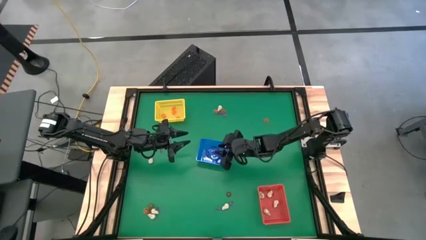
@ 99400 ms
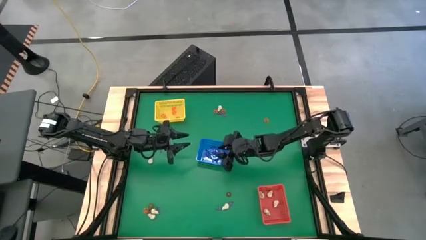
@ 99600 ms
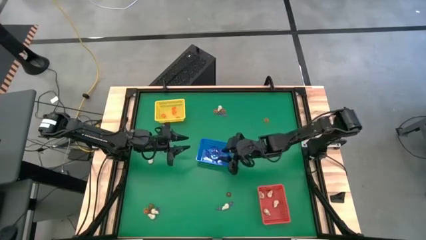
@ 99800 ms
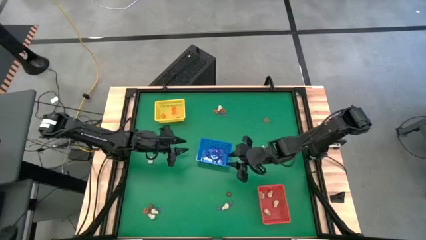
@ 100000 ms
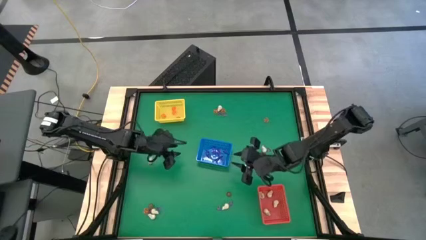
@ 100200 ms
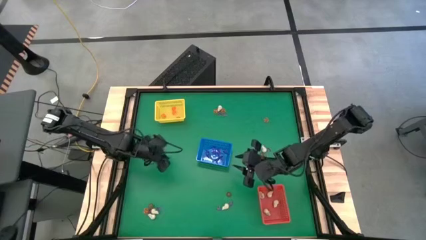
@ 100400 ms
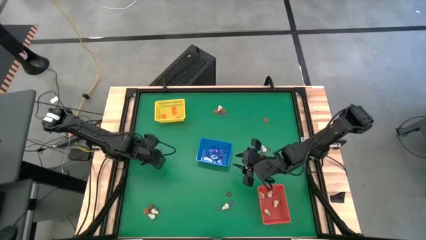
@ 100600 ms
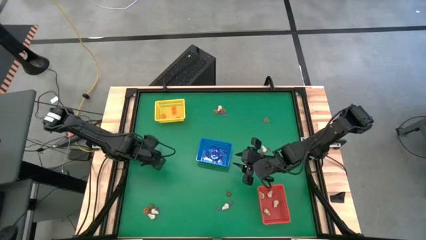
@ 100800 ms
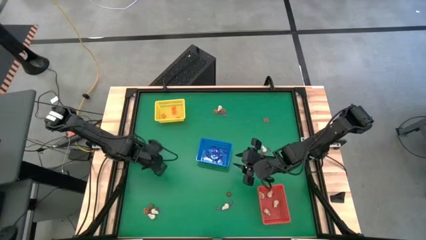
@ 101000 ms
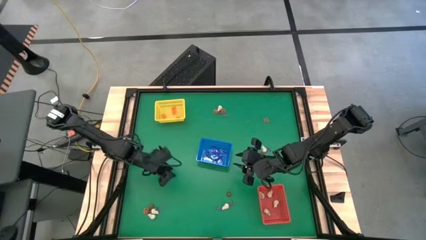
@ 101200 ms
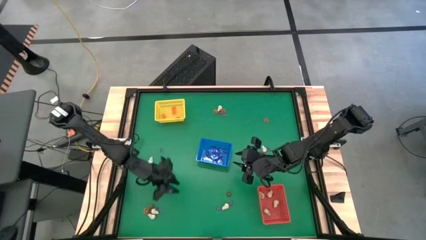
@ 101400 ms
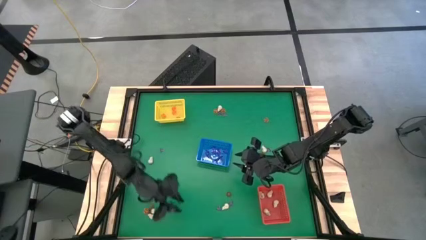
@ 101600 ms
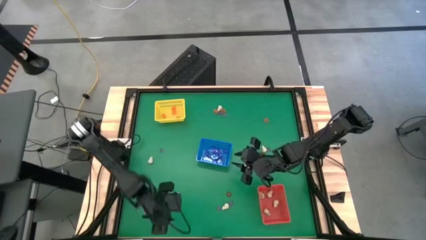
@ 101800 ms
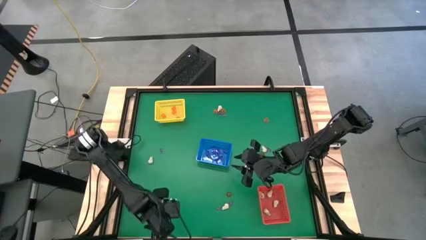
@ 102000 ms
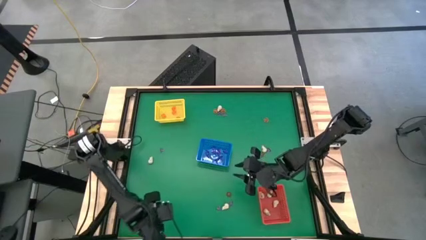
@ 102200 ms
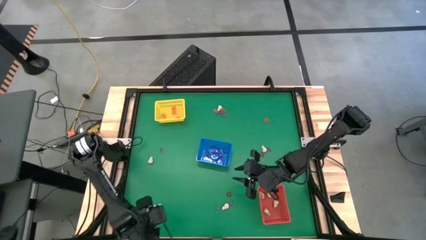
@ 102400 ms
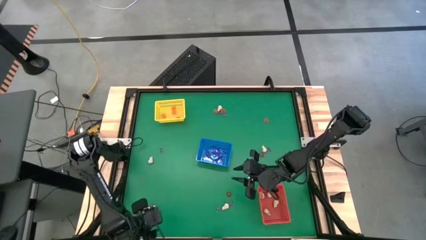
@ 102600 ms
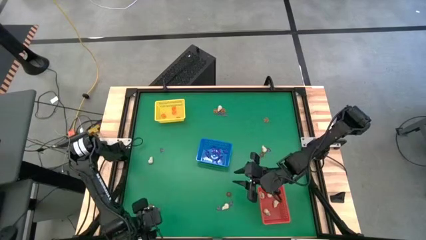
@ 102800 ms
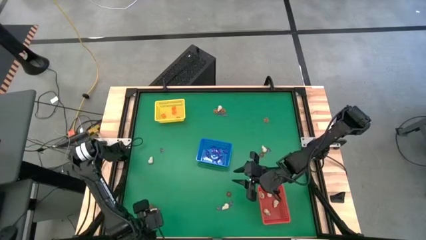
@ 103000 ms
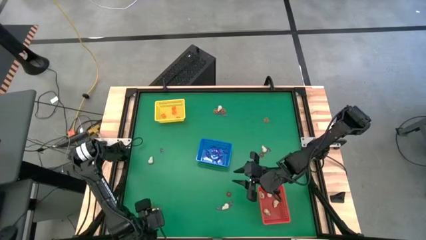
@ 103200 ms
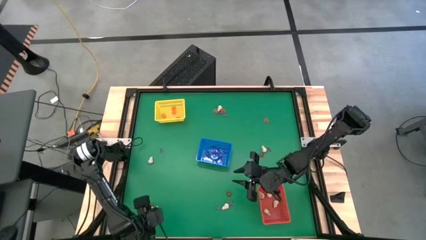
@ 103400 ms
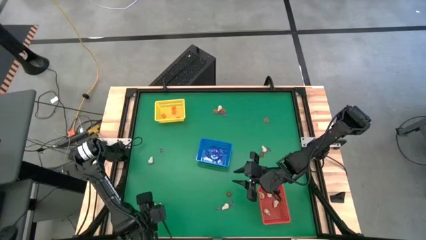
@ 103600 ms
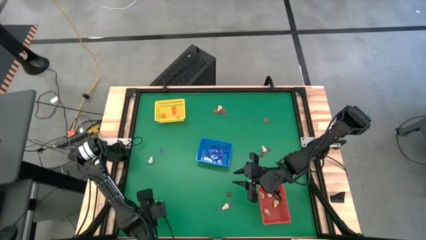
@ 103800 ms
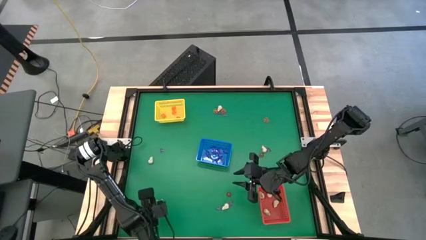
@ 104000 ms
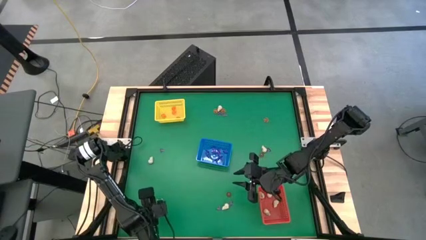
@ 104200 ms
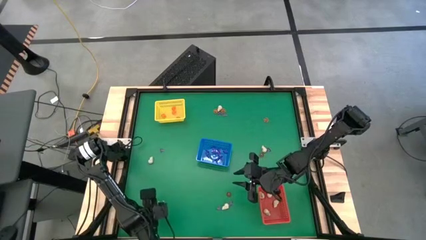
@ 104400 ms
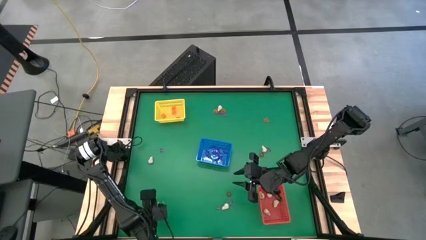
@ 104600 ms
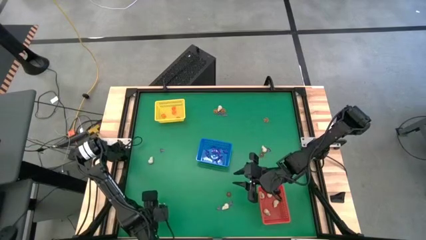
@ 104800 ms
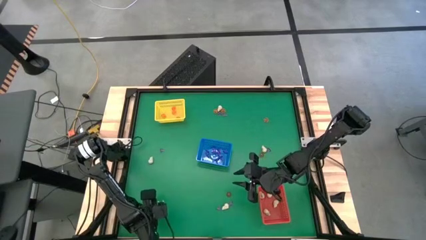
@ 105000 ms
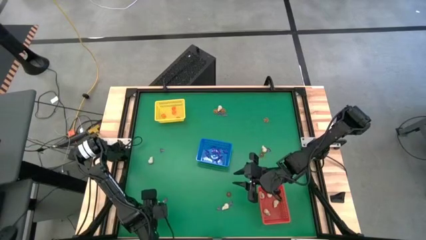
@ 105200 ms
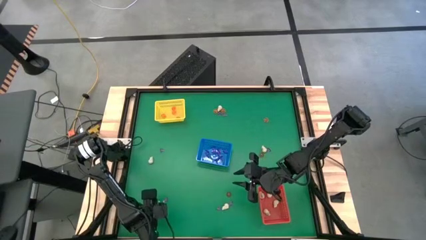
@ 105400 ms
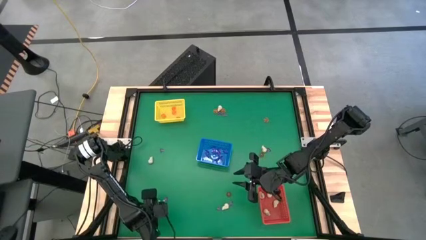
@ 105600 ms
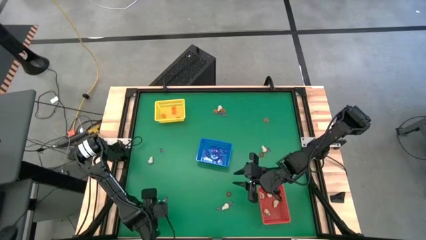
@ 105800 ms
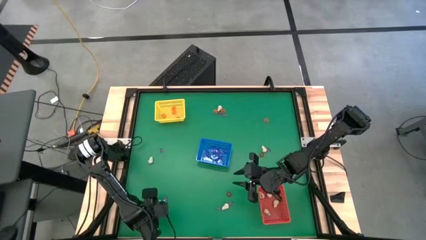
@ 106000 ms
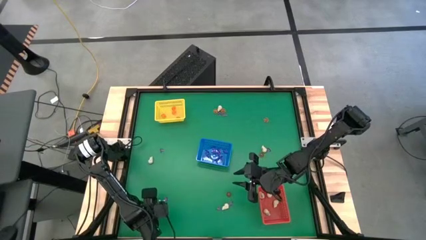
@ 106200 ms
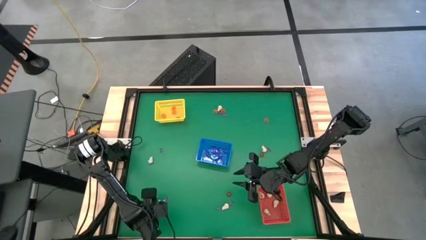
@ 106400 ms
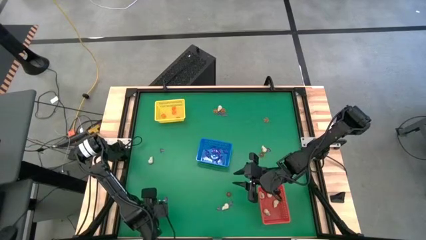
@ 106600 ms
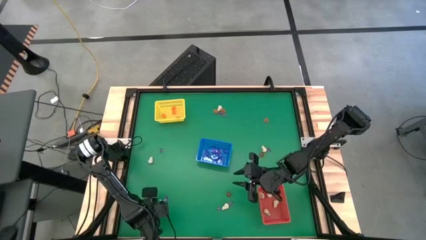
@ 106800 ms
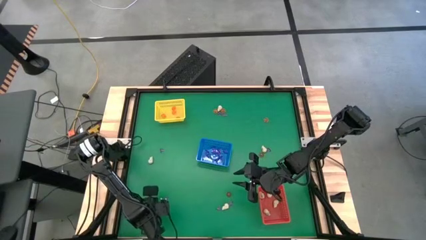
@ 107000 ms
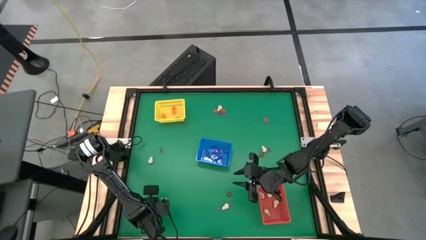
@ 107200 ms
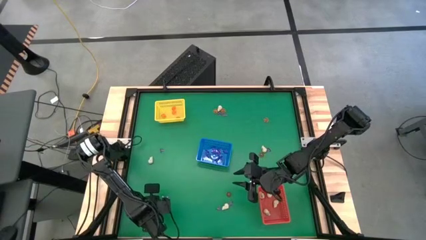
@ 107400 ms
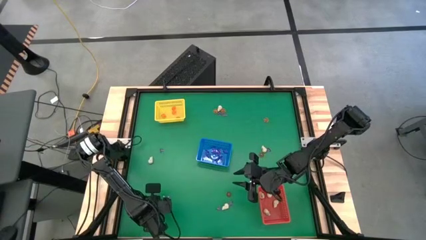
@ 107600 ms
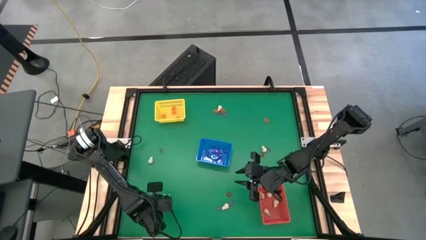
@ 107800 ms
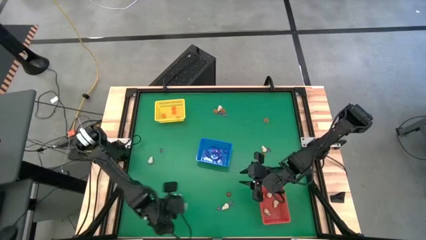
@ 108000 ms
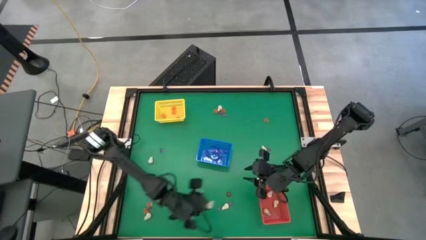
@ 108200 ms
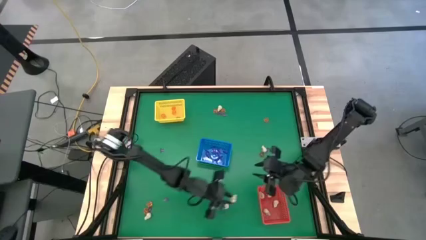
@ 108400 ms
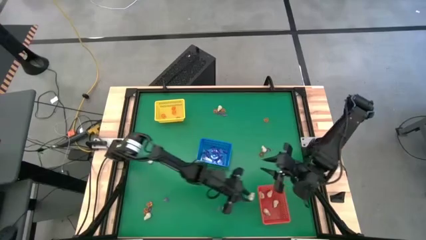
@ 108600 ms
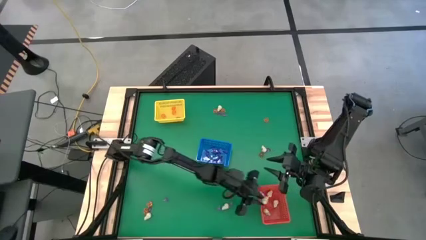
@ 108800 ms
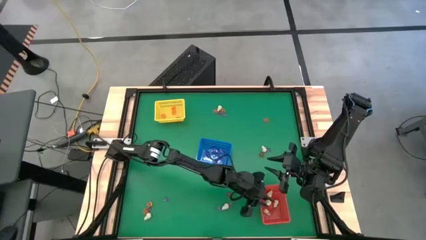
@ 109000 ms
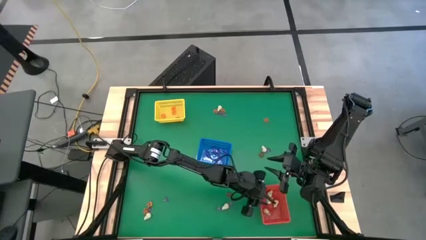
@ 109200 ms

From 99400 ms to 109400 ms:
Task: Sort Halloween decoration
Put the skull toy into the red bin

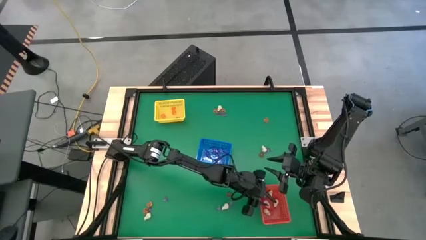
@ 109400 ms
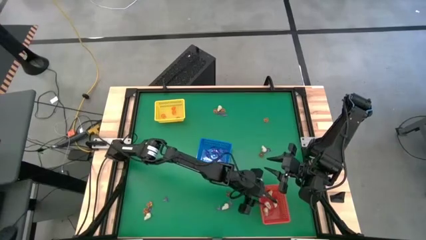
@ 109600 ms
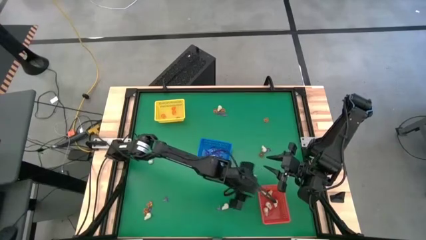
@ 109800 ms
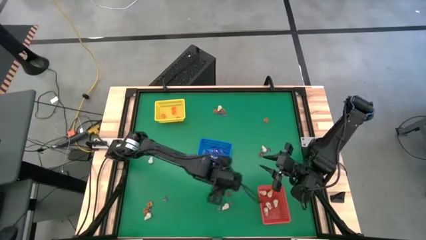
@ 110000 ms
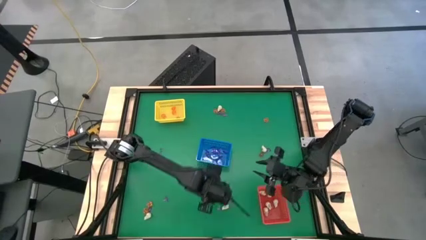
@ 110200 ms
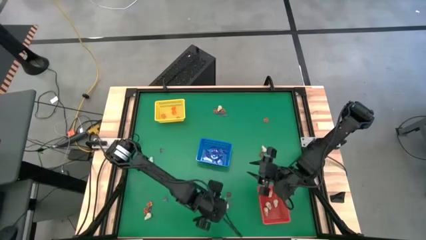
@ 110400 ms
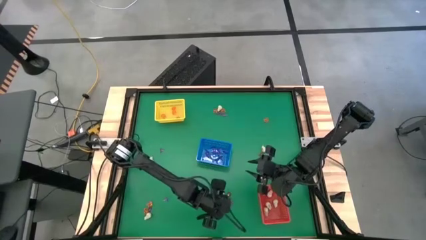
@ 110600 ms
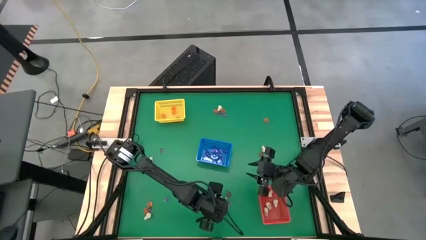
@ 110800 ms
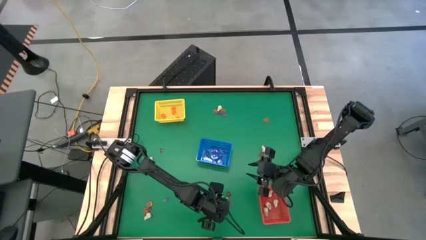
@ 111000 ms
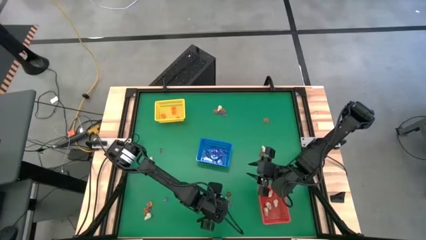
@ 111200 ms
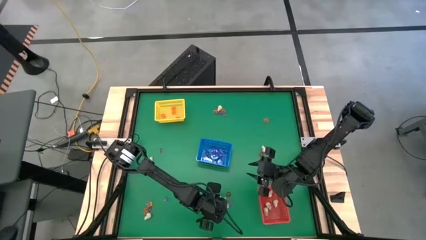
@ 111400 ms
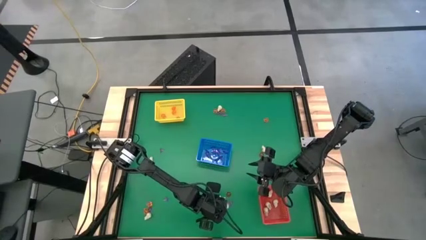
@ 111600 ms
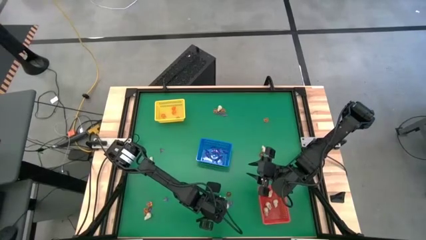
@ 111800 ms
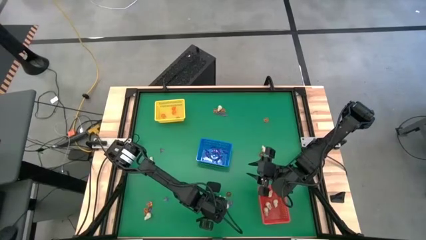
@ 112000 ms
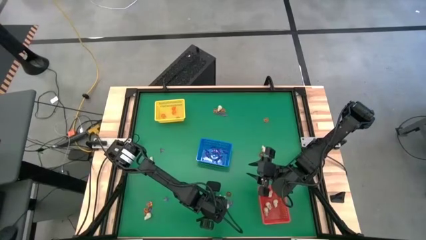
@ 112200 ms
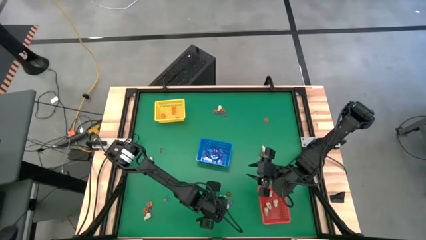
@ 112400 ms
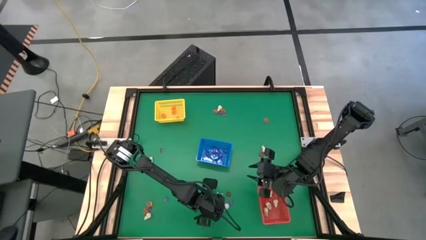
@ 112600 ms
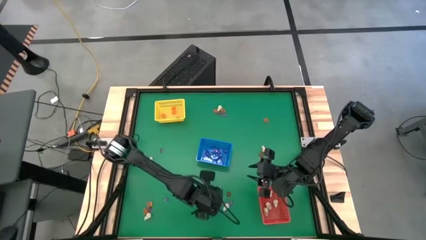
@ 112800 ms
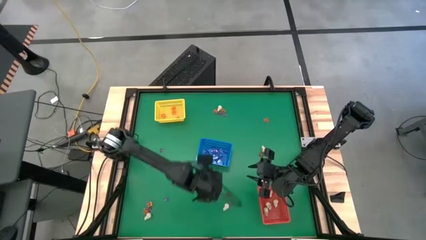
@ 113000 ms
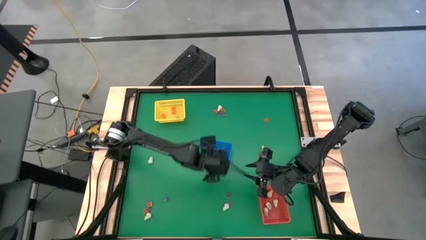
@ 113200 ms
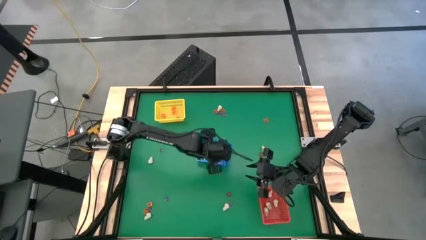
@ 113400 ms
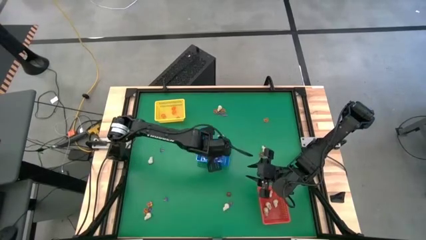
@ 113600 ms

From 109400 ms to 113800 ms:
Put the witch hat toy into the blue bin

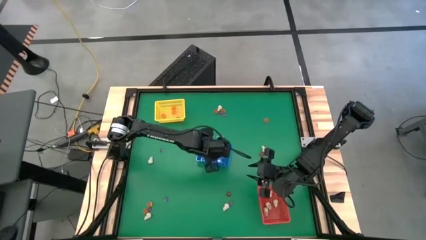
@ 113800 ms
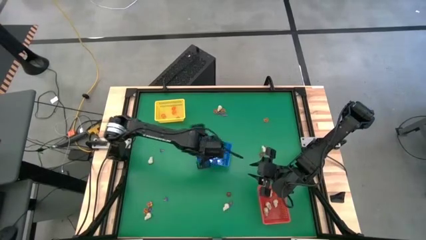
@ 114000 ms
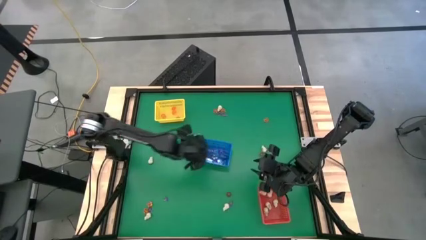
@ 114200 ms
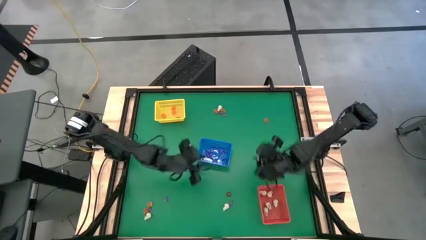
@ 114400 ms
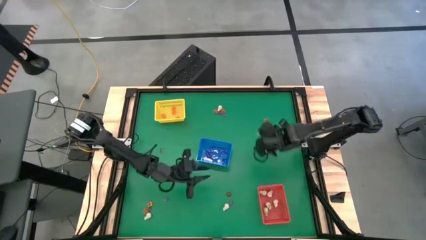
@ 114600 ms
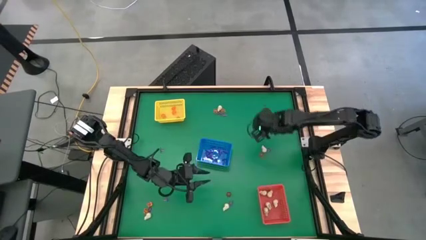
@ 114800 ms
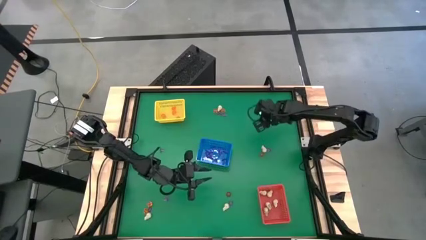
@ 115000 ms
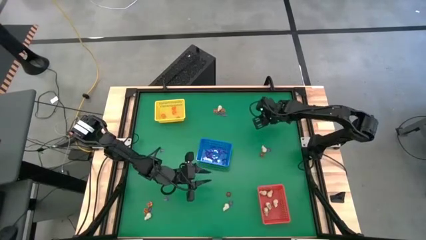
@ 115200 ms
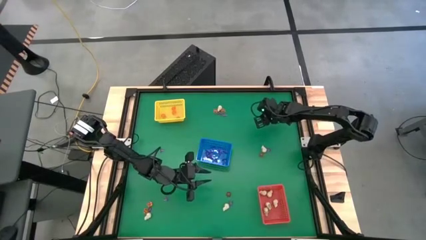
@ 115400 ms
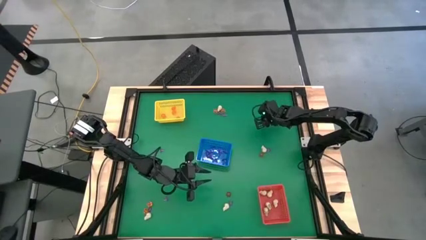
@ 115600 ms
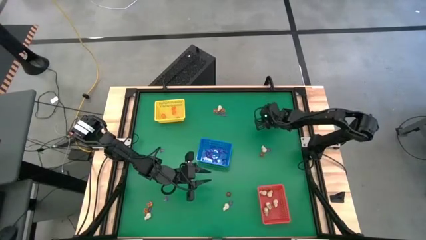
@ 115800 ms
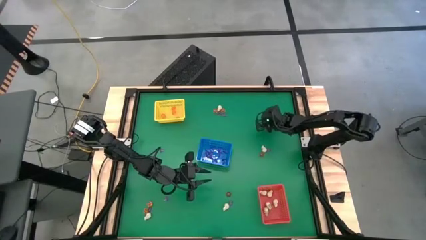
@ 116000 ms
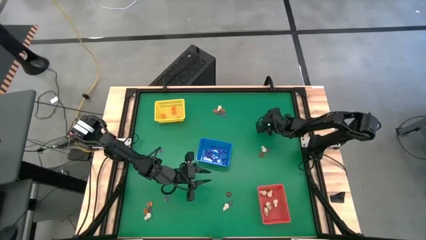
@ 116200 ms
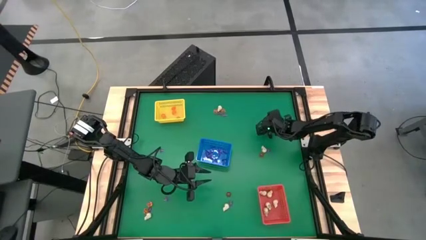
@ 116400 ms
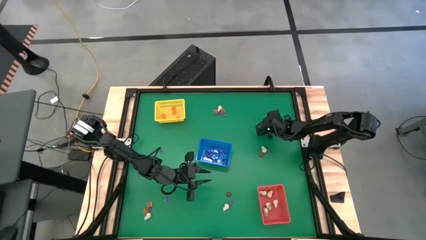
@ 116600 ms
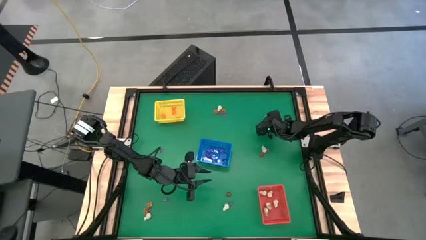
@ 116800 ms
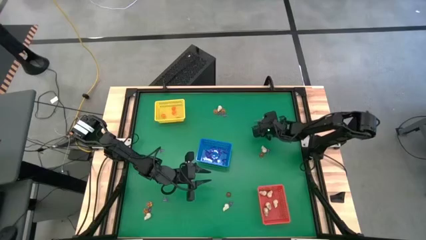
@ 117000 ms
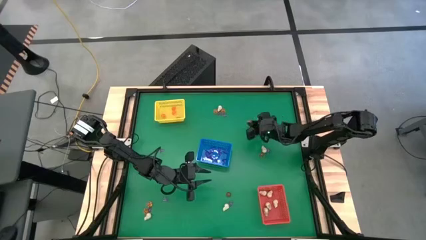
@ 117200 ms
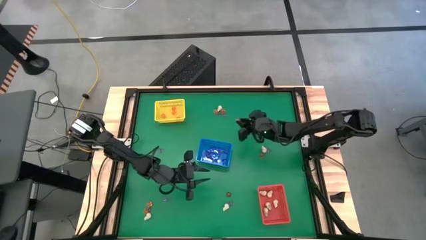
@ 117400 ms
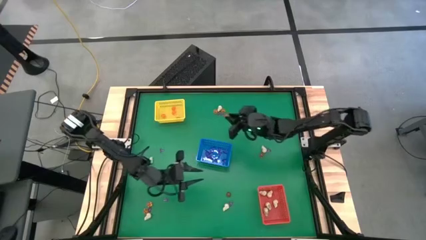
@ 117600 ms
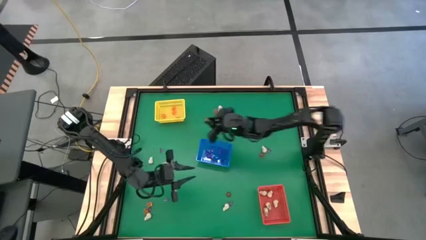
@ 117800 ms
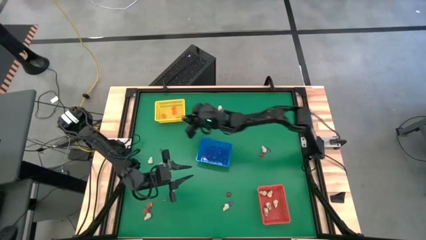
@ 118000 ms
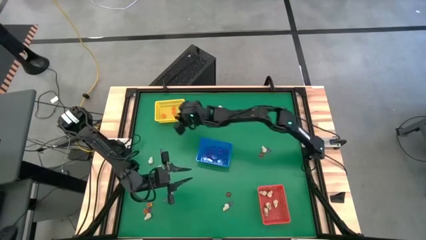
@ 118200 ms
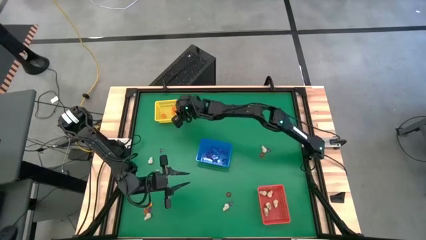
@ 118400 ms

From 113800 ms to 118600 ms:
Put the pumpkin toy into the yellow bin
